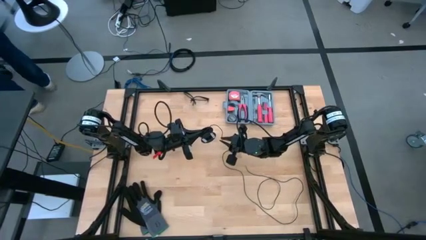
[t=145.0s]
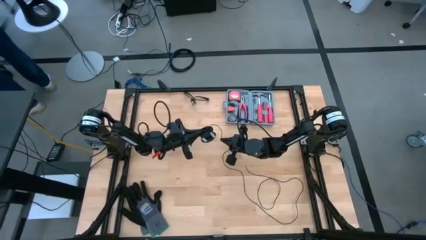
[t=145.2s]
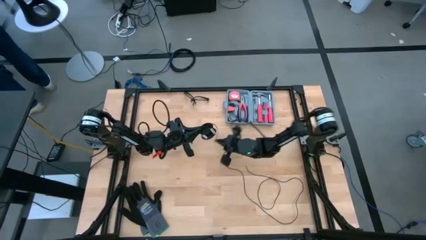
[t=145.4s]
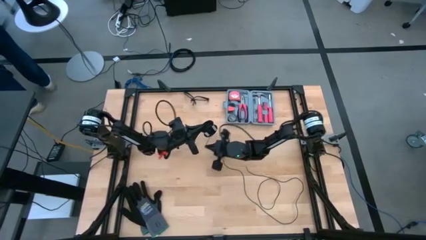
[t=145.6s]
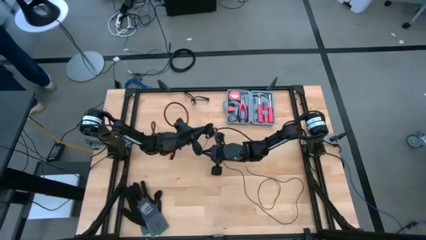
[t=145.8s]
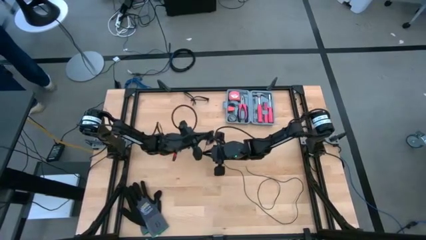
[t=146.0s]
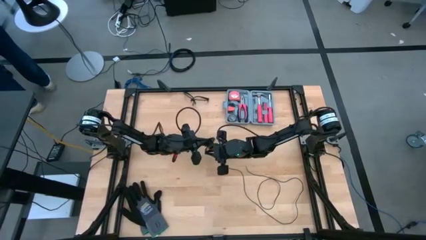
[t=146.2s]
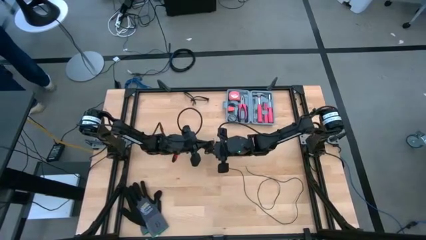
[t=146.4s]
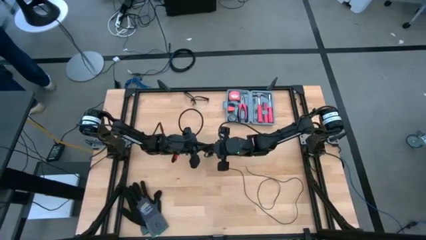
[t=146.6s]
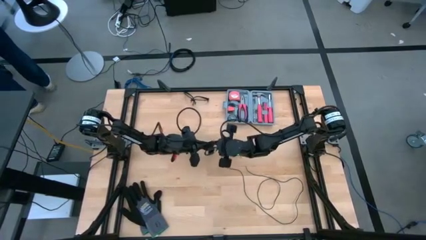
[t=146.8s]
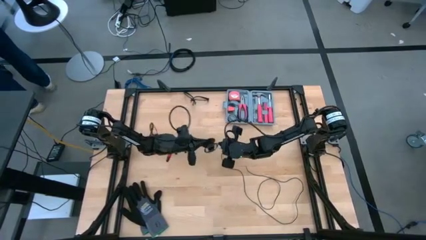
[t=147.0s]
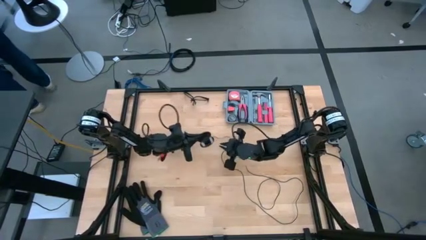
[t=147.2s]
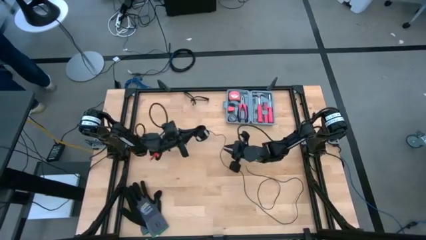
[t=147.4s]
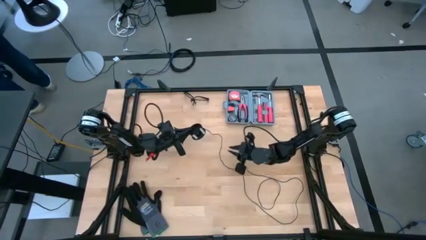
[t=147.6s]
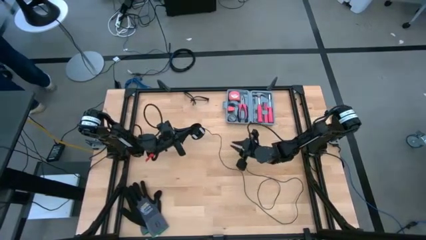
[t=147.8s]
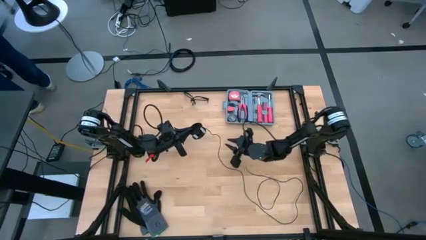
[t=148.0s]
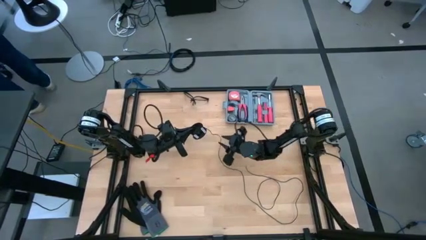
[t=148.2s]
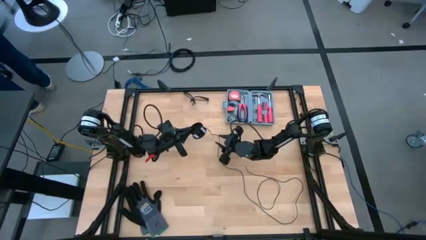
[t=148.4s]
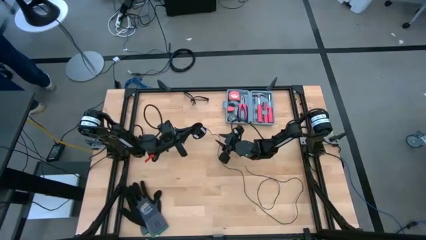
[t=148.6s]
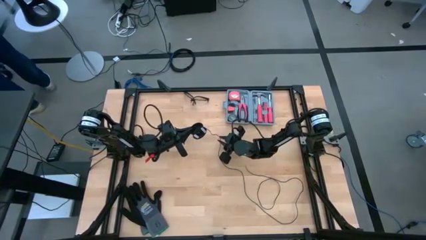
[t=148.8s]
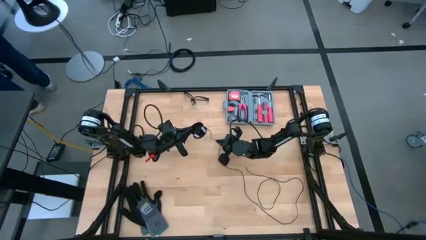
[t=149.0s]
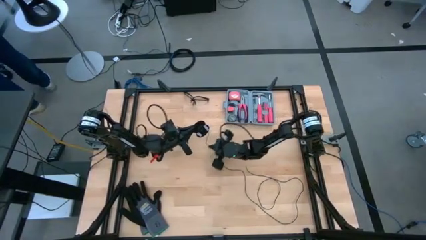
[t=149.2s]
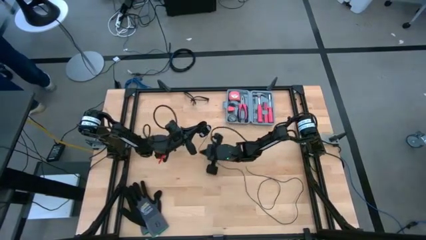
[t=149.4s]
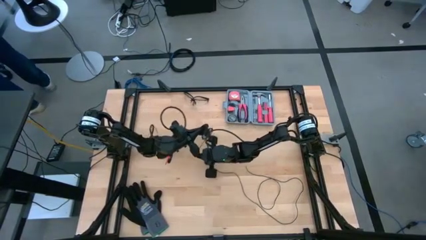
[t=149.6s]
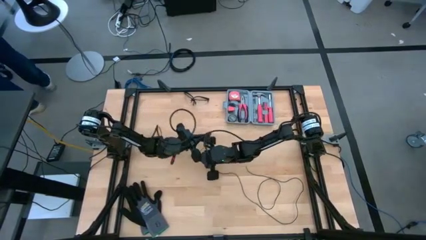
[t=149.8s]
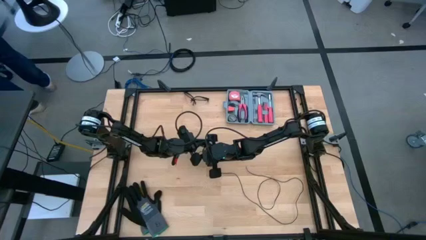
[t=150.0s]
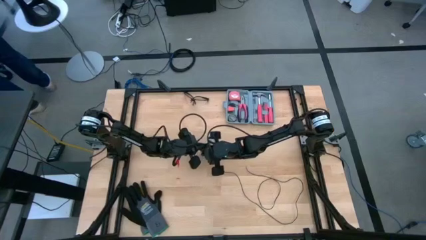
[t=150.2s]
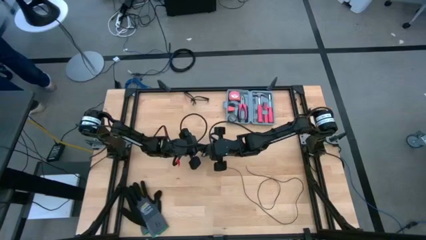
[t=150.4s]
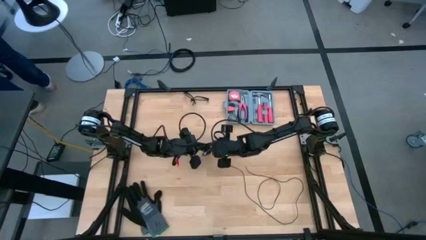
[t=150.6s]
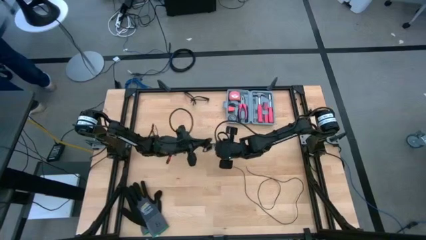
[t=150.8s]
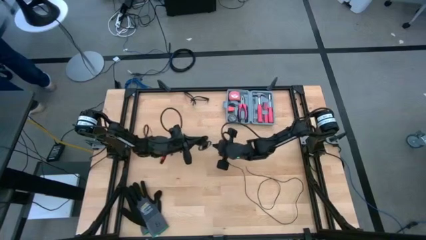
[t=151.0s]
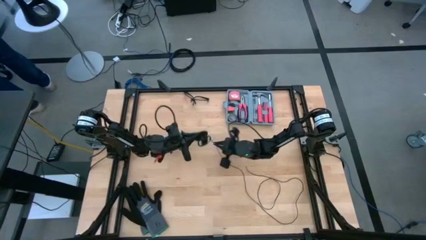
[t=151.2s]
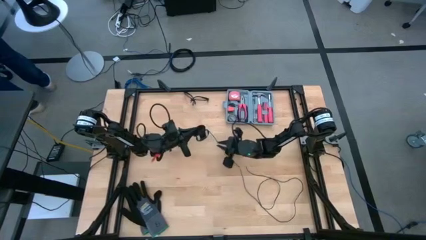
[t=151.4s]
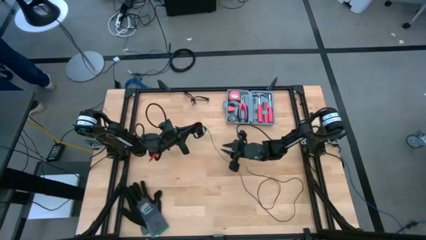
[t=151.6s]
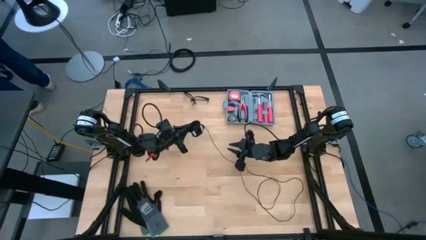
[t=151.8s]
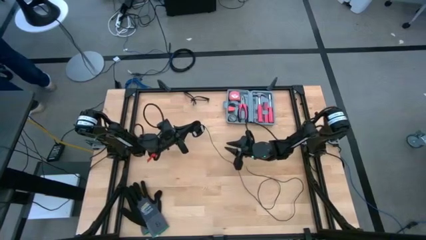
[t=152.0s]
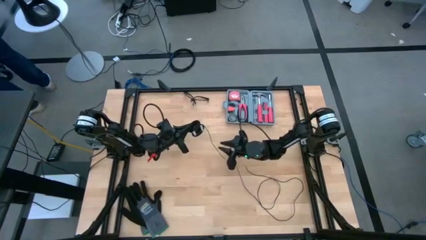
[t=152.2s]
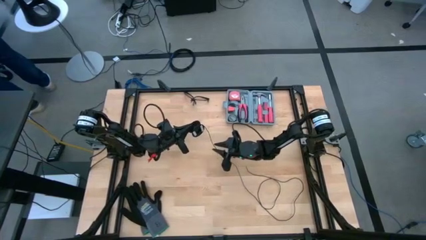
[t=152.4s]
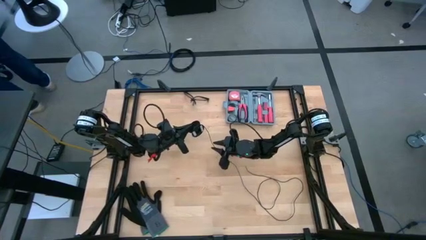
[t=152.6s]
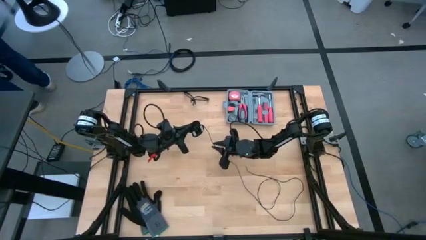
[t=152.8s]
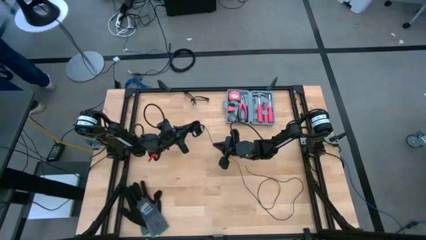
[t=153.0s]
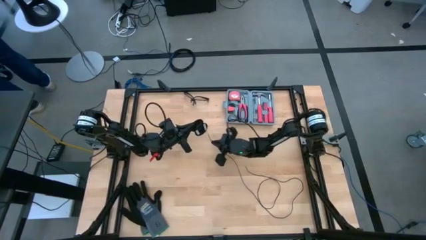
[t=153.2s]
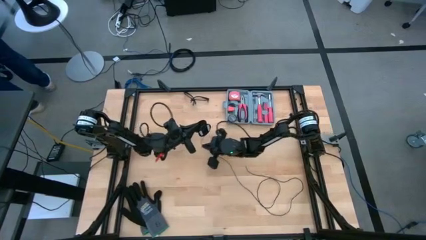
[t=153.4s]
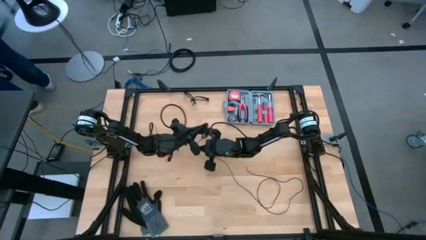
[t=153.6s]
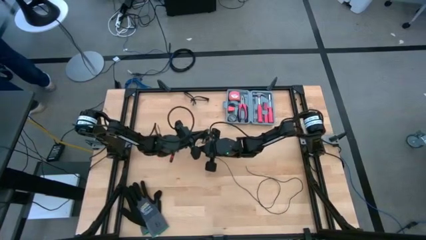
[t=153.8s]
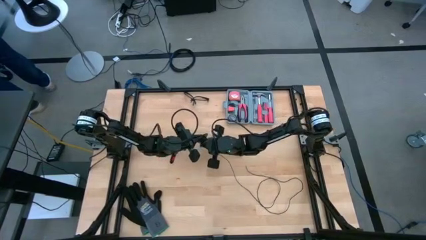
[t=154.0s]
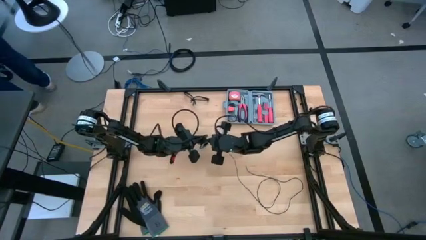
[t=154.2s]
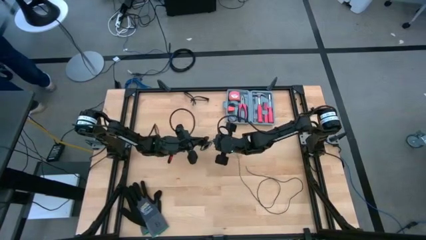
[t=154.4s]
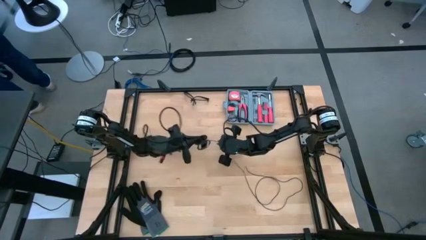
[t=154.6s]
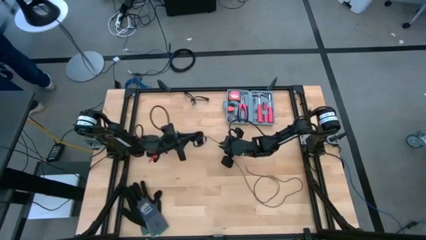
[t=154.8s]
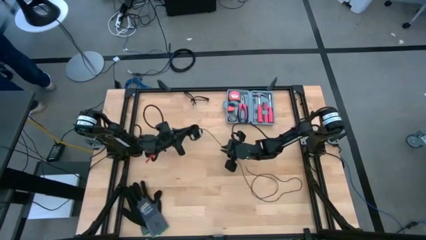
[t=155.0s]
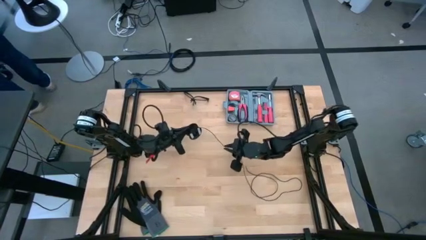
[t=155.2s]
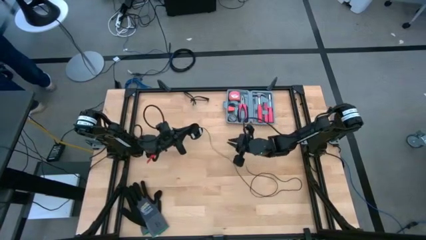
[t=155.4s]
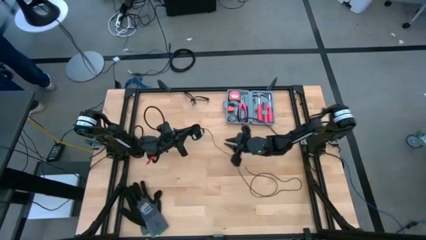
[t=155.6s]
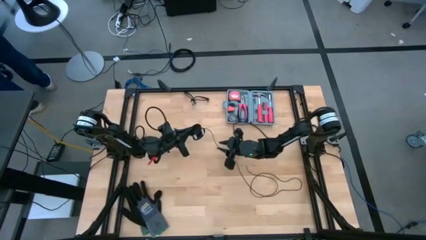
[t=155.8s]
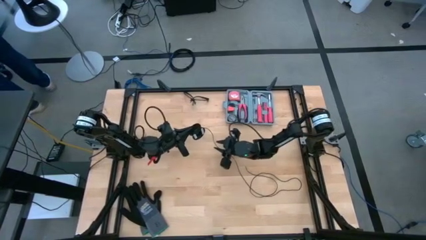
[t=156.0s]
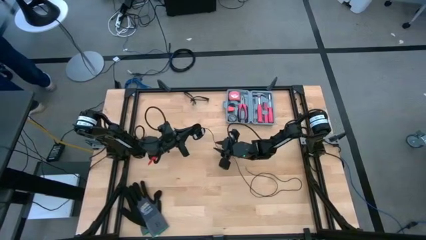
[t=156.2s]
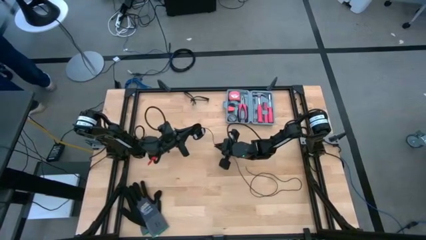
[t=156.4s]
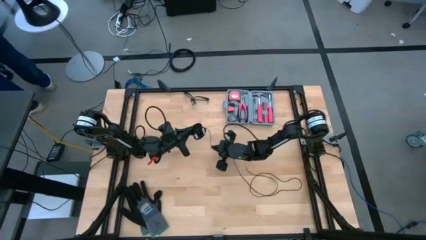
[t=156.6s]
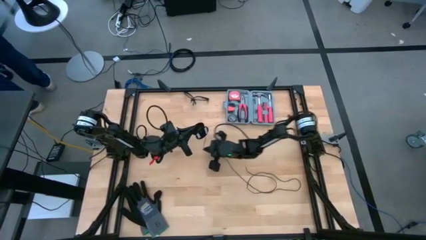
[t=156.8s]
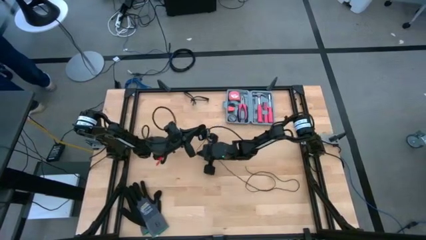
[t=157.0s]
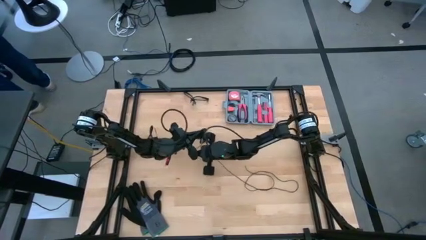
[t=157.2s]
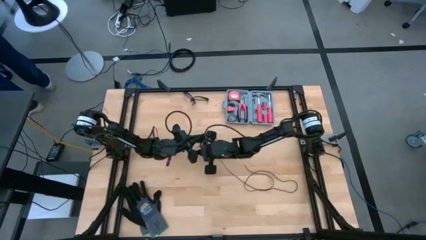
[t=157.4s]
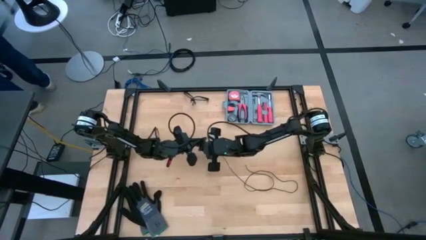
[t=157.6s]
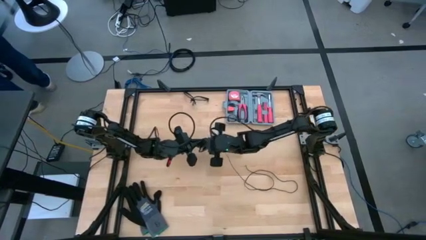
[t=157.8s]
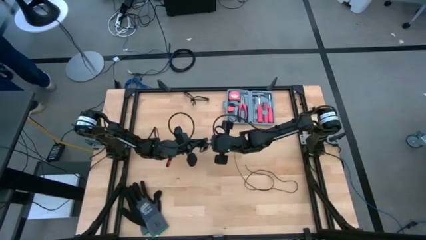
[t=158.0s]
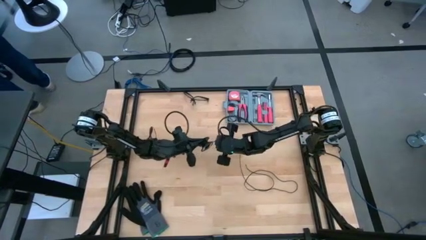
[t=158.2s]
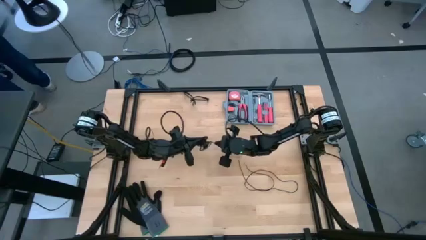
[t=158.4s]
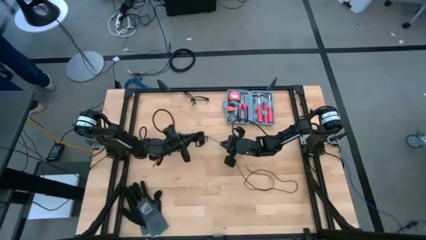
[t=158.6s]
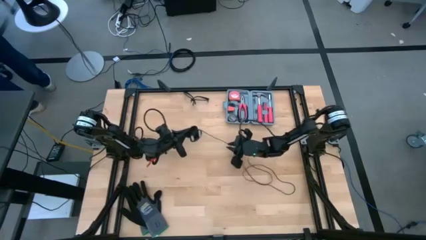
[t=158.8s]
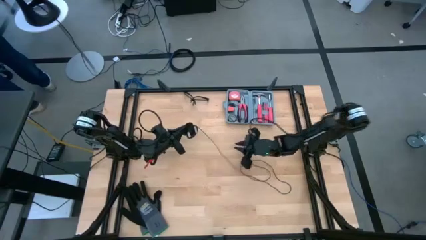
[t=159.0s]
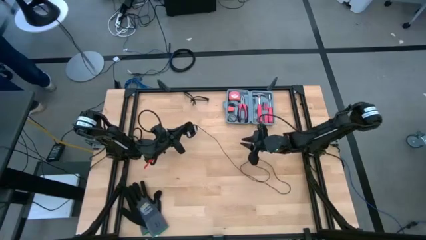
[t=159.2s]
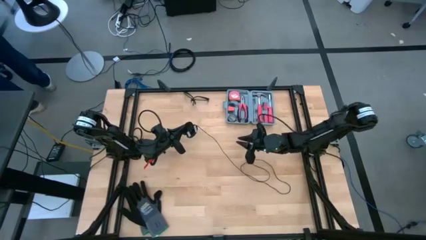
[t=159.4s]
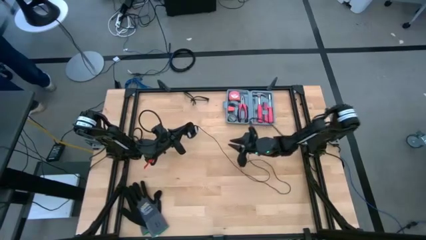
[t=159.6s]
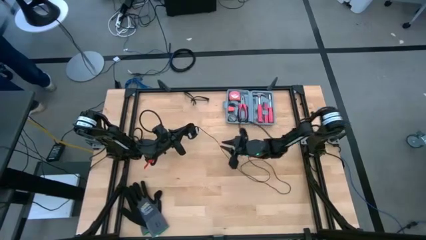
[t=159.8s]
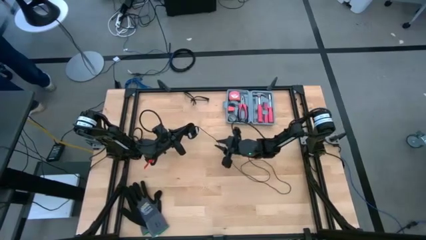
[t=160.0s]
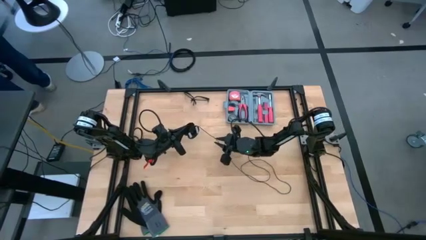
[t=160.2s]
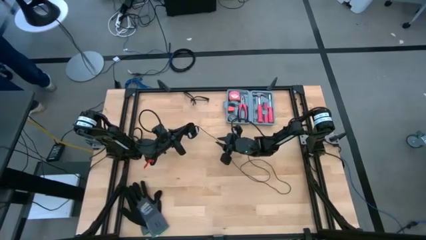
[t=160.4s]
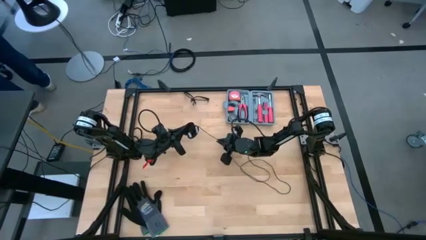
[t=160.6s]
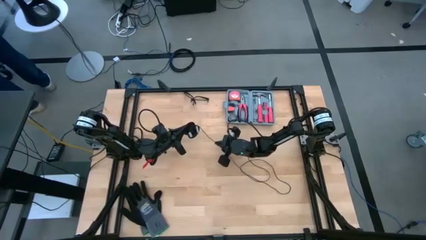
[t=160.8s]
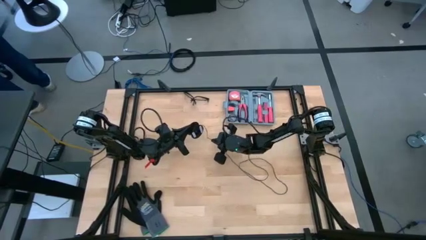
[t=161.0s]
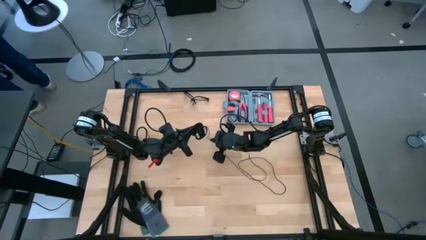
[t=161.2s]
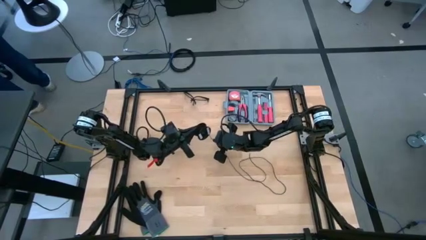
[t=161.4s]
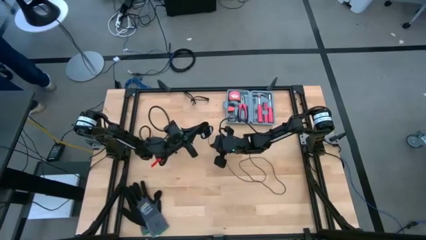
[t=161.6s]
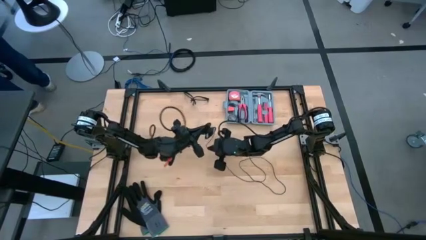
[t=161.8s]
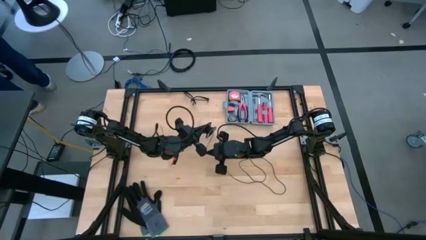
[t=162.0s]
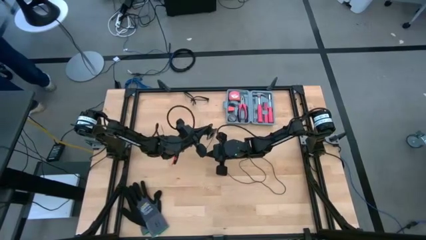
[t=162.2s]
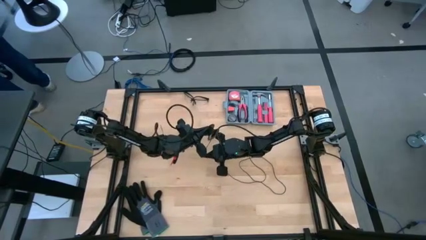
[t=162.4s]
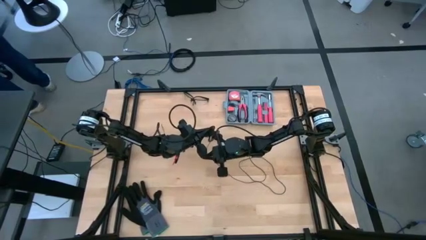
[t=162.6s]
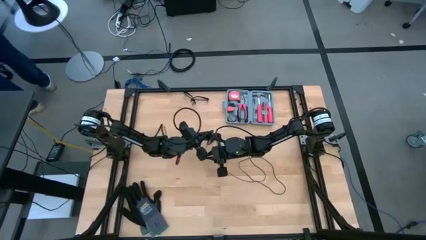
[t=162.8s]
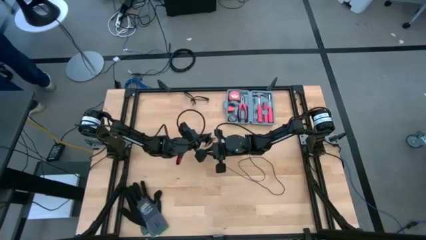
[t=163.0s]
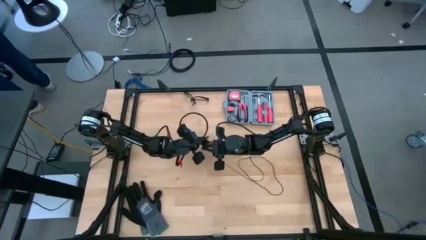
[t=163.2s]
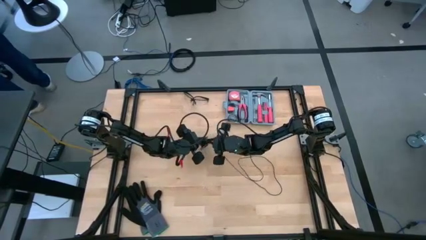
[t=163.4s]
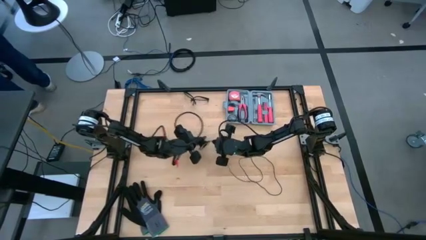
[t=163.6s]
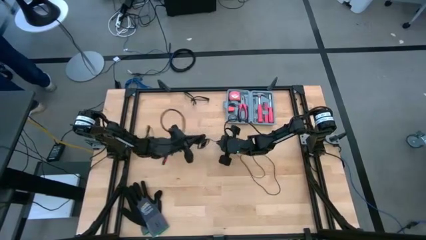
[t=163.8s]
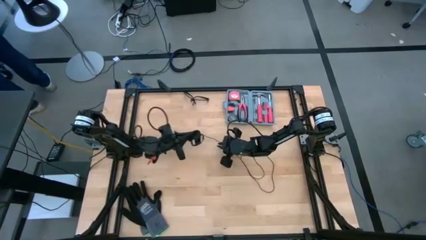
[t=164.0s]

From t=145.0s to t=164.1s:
Task: Coil cords
Coil the black wire onto the spool
